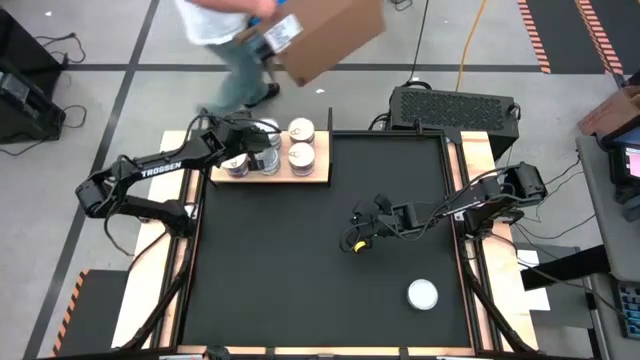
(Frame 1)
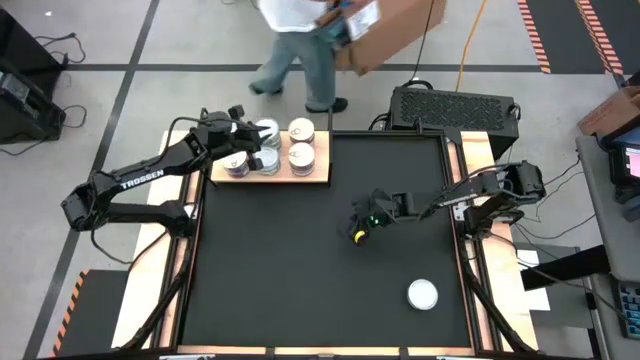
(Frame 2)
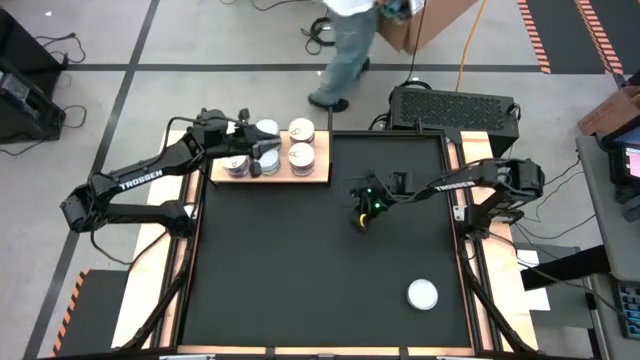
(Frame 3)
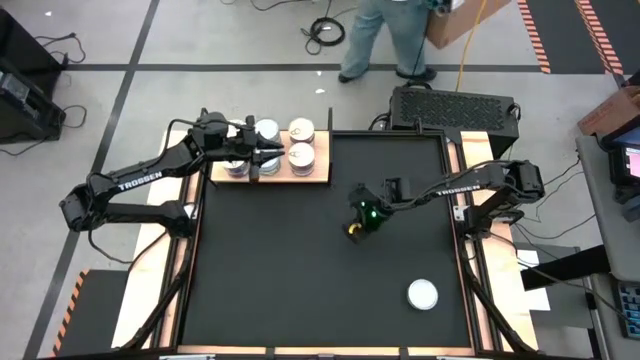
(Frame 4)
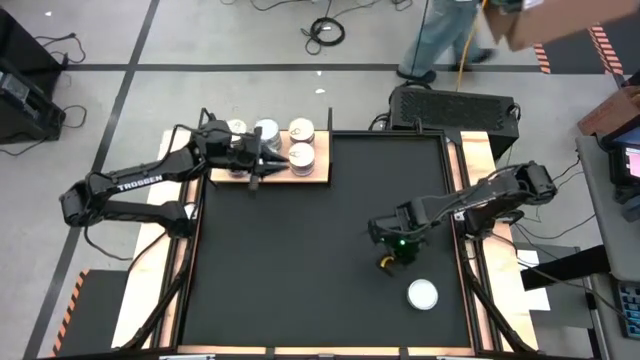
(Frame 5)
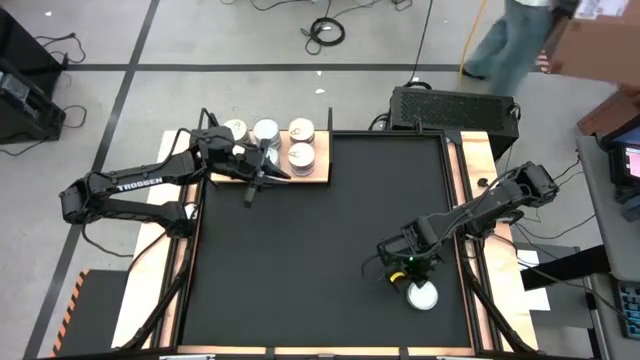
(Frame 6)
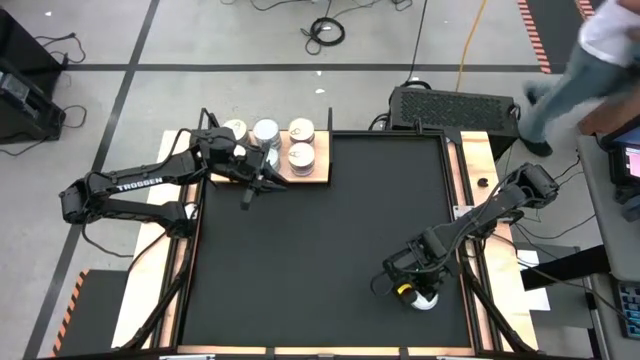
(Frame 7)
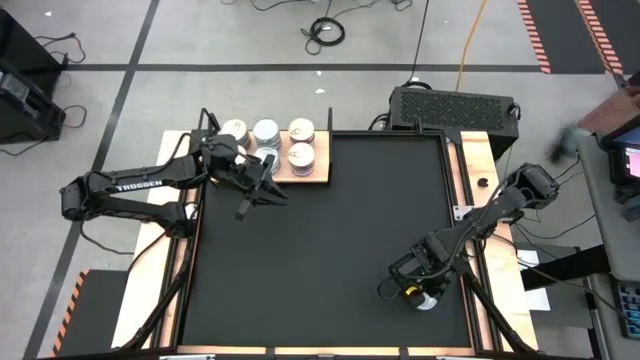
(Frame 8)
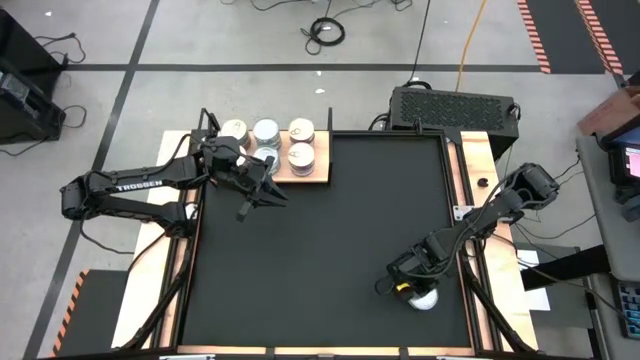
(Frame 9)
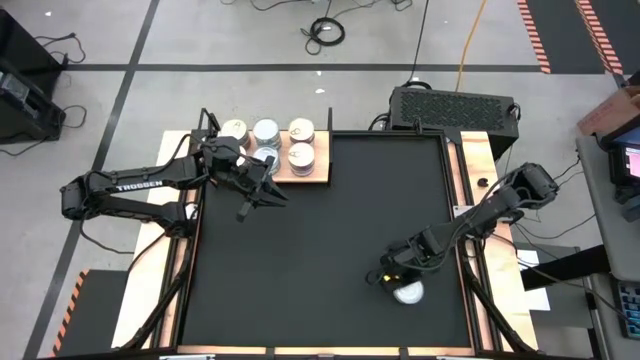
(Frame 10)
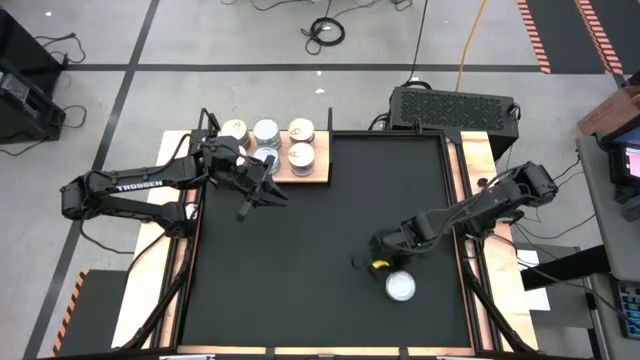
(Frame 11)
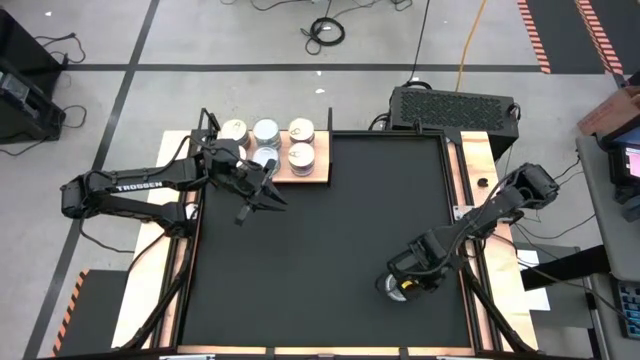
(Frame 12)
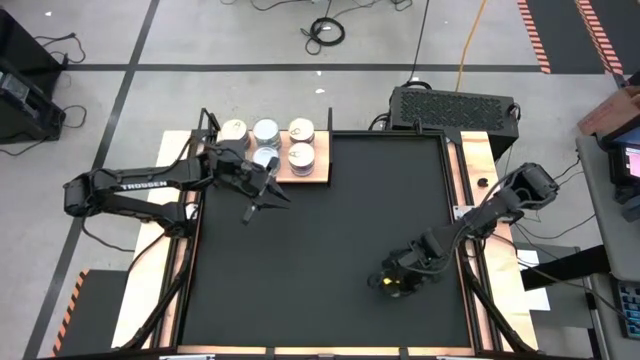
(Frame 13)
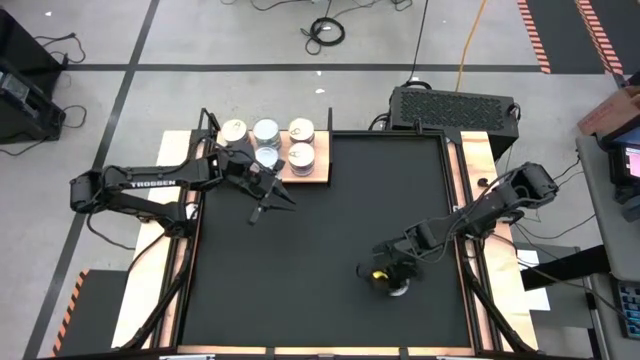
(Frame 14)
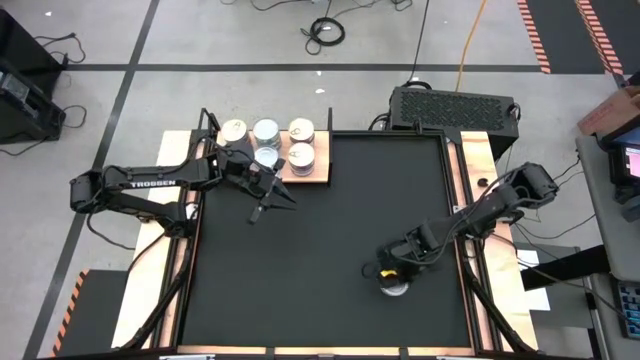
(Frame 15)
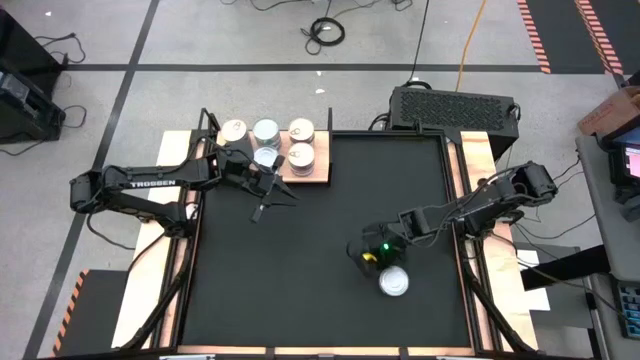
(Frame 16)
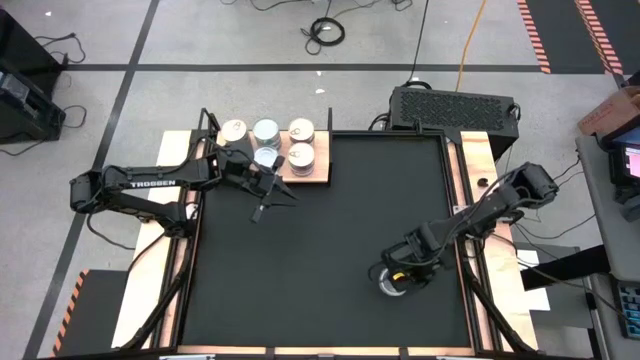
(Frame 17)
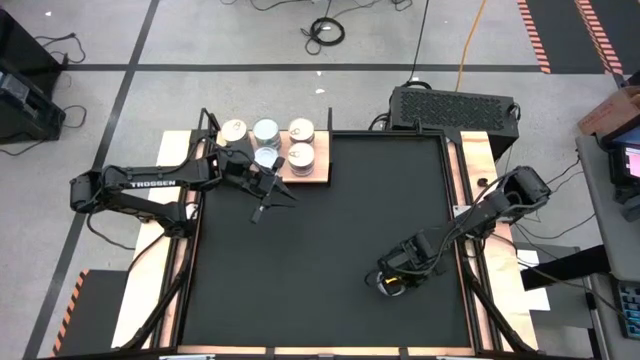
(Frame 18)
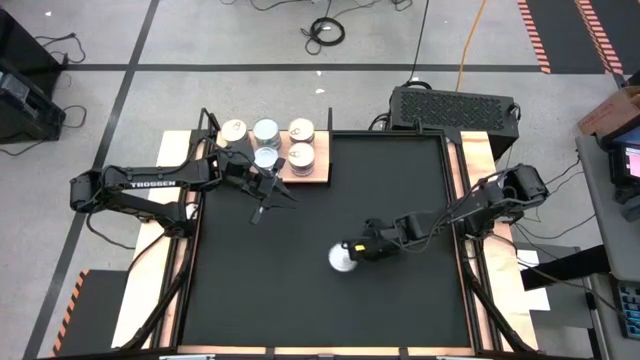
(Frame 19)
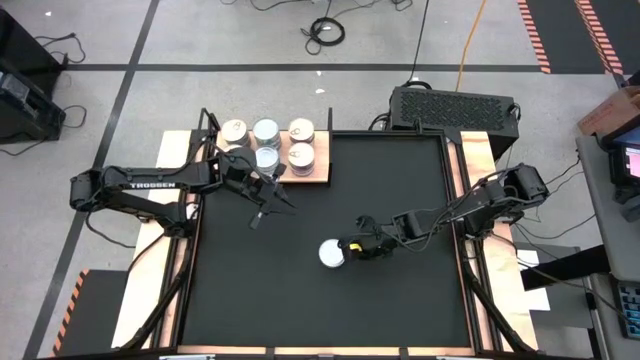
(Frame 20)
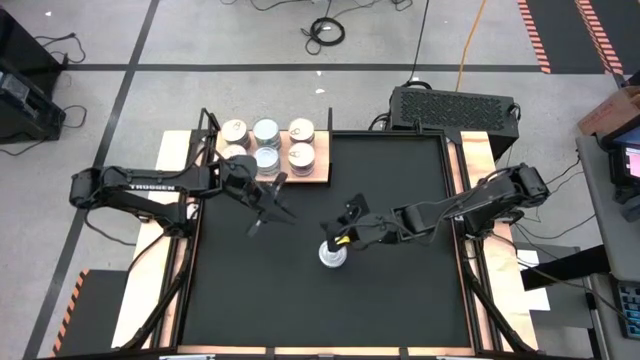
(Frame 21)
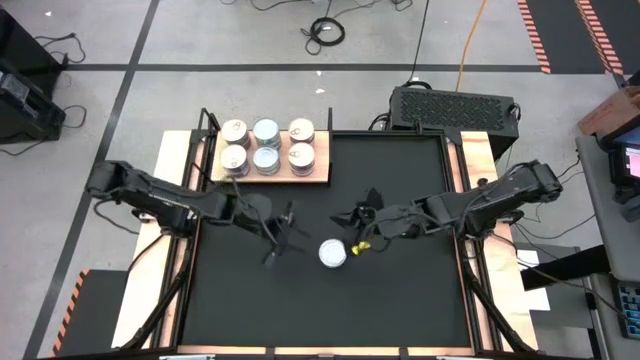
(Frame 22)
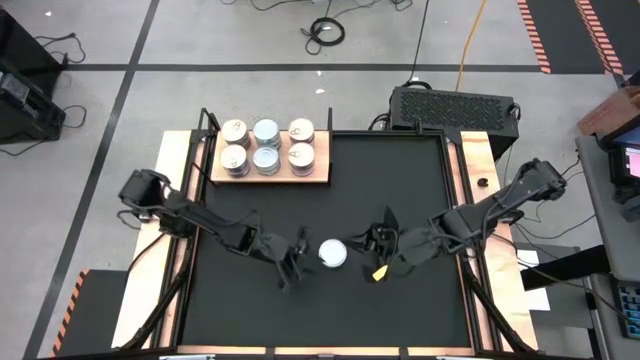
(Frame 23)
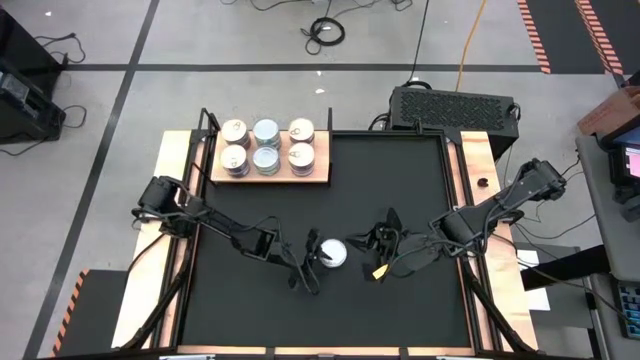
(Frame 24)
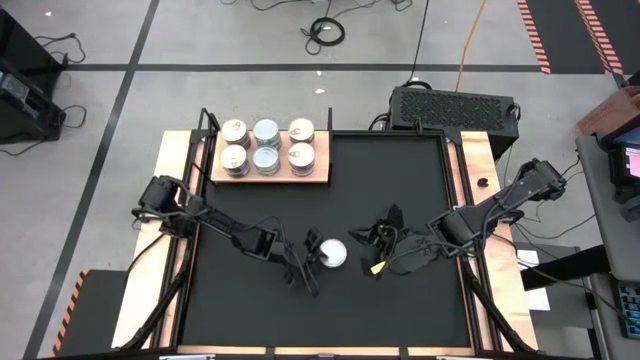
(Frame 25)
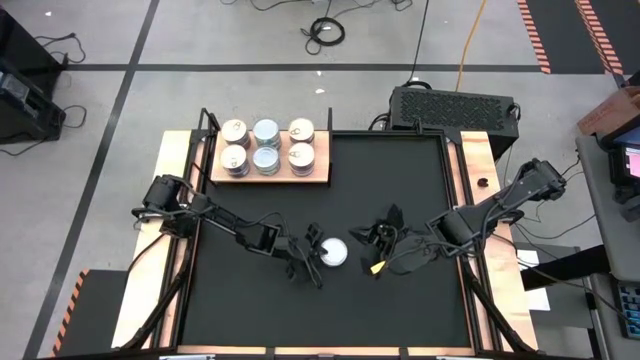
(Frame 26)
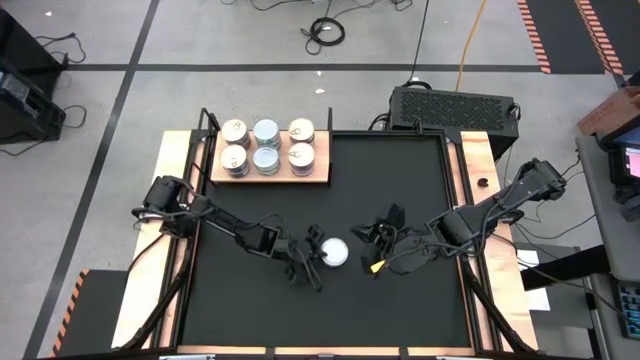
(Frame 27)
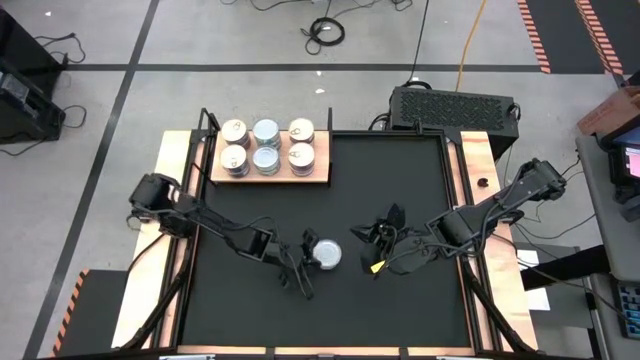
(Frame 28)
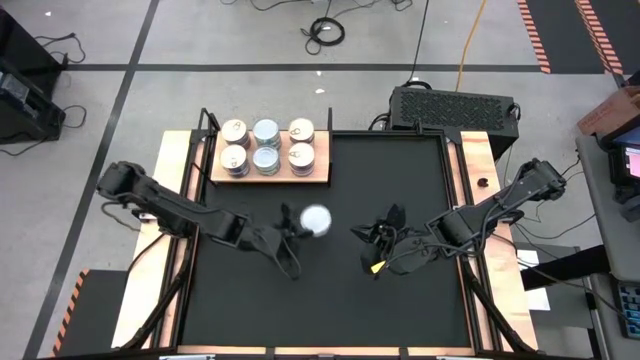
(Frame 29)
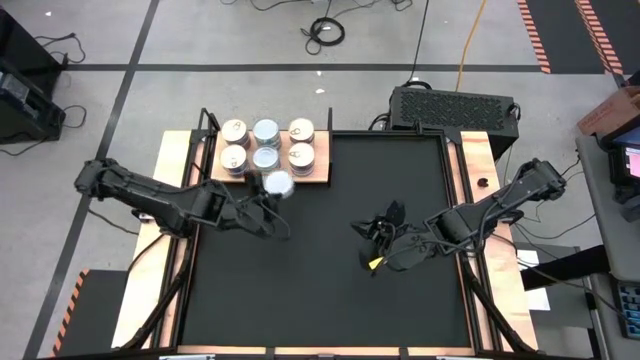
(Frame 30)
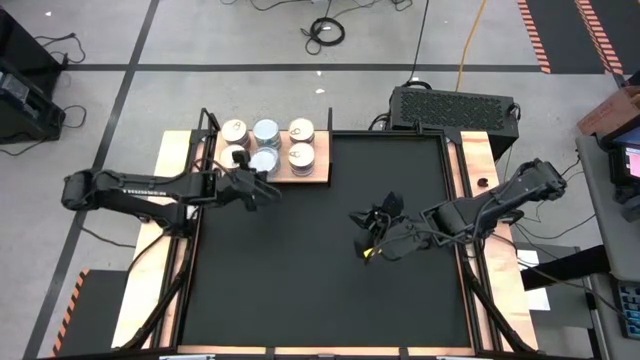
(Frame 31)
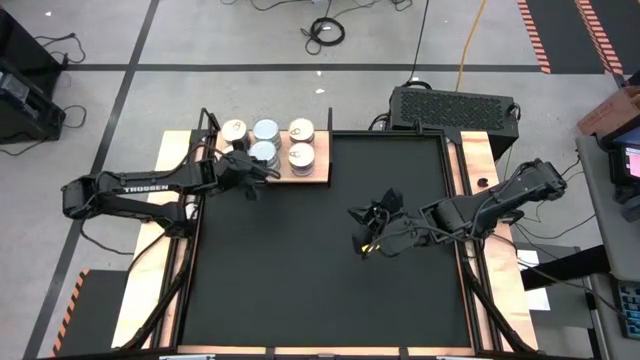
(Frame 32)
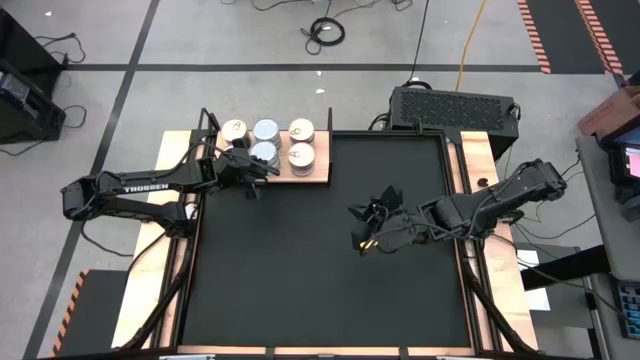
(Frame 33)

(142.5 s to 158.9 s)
Task: Stack canned seafood by type on shelf
Stack the green tuna can on top of the green tuna can on the shelf

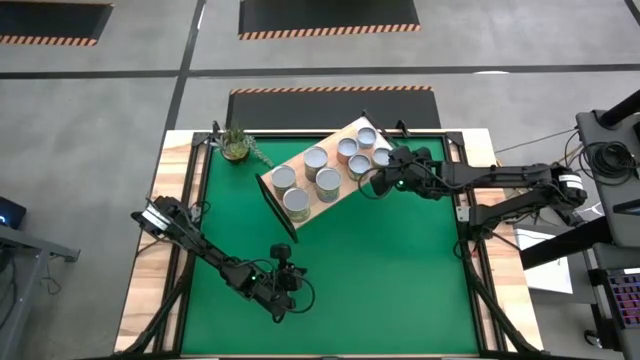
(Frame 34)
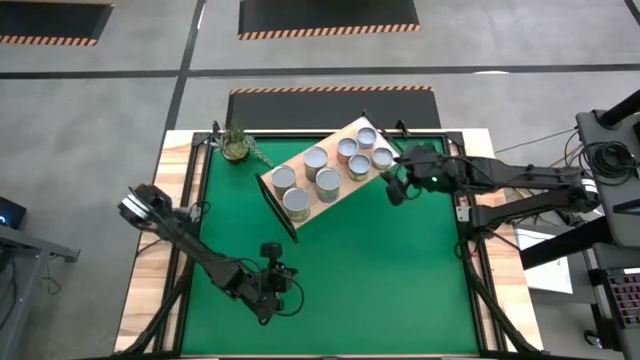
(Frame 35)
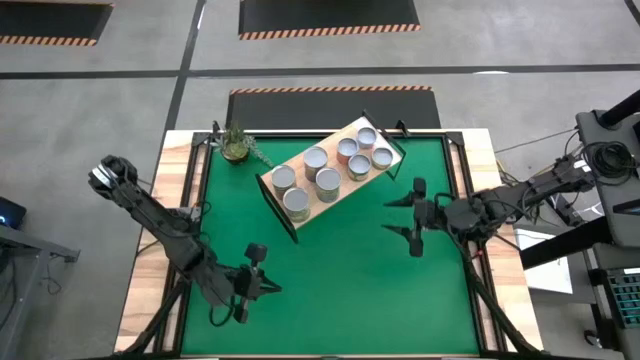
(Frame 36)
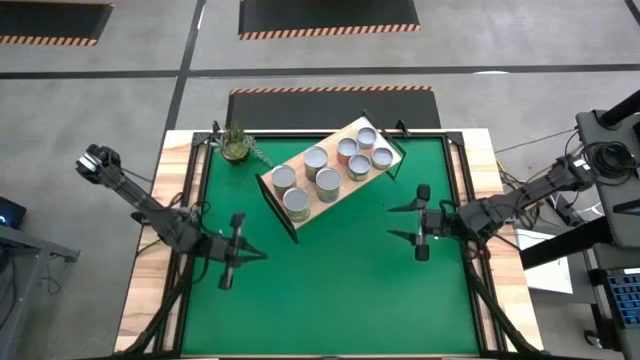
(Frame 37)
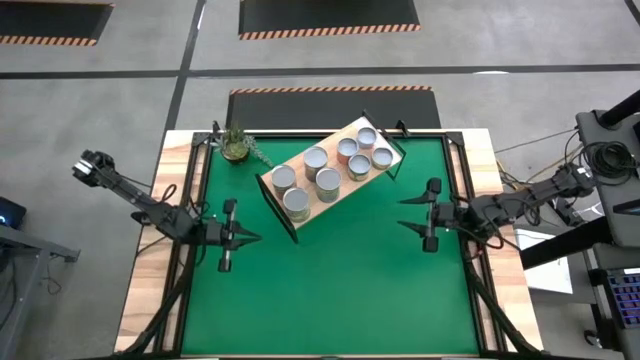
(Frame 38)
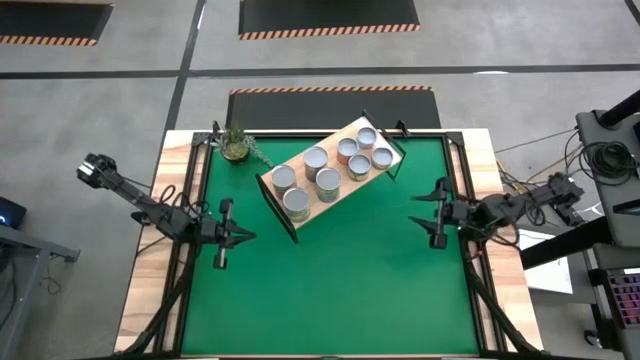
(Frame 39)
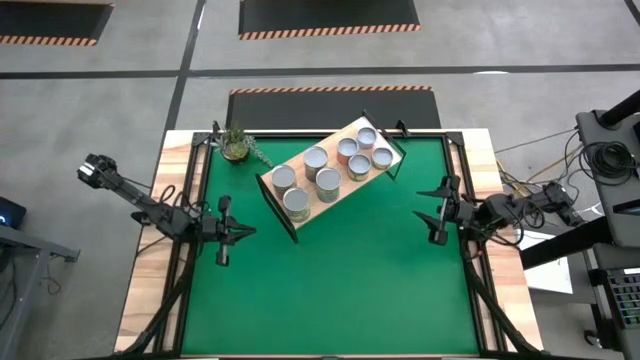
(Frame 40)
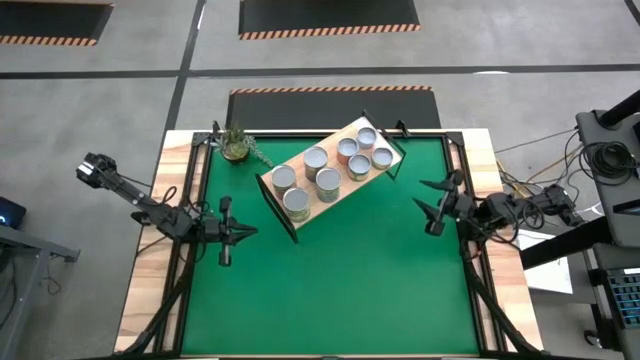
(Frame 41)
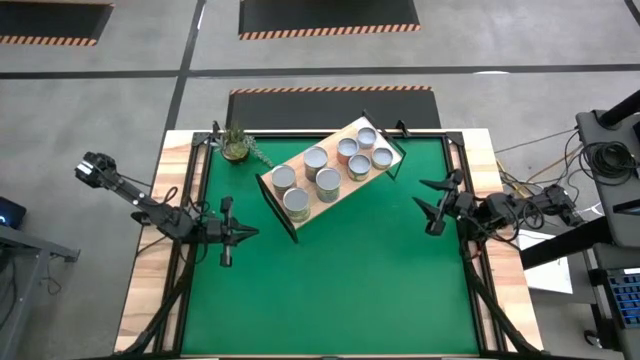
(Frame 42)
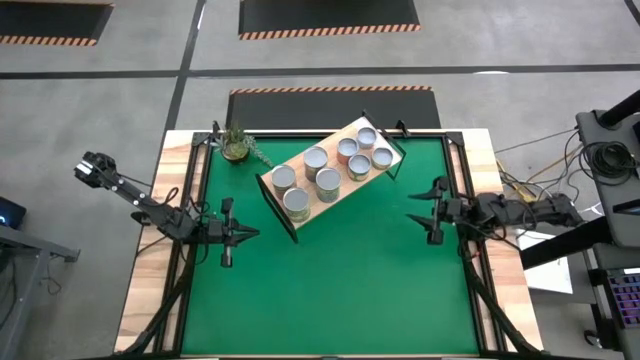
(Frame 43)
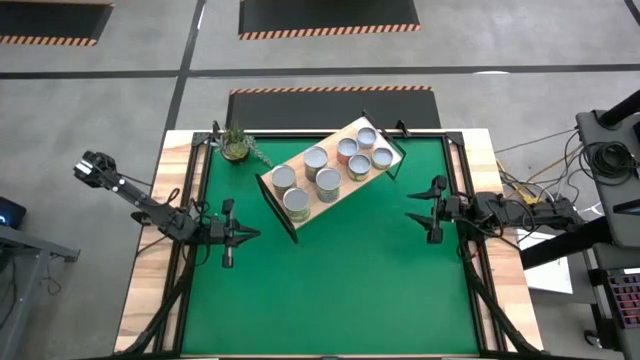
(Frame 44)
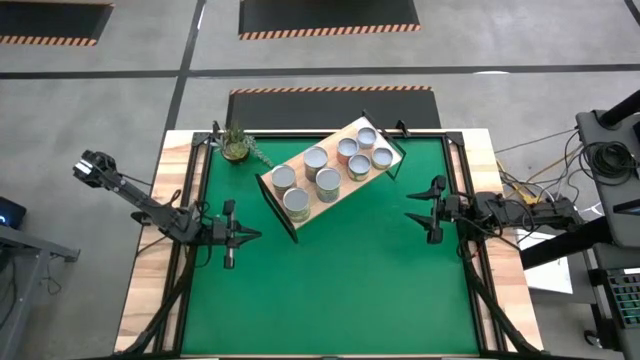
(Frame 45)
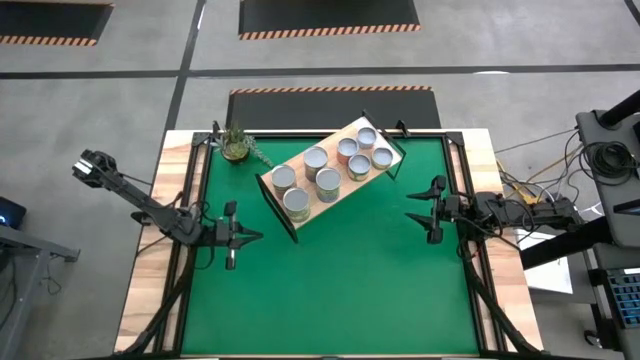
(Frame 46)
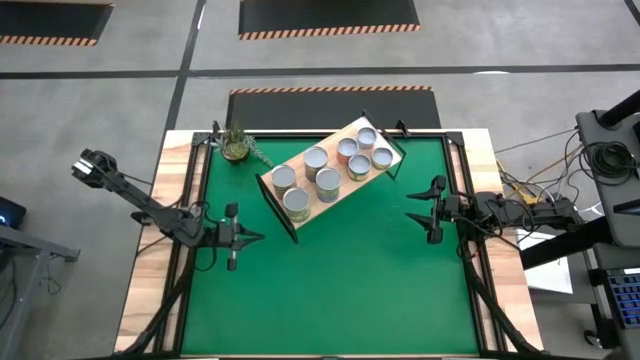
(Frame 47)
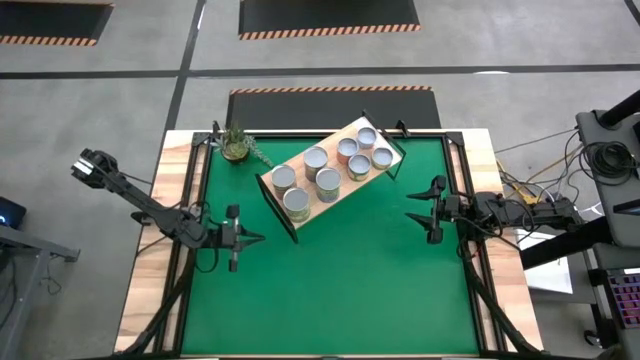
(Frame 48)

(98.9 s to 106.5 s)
Task: Pick and place cans onto a shelf
Return to Home Position
